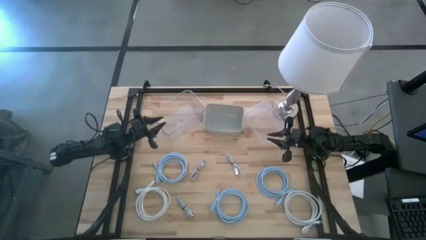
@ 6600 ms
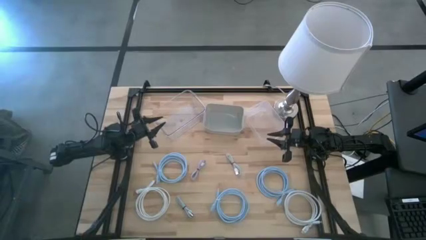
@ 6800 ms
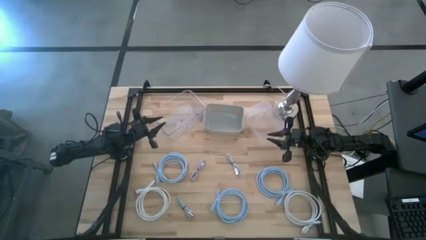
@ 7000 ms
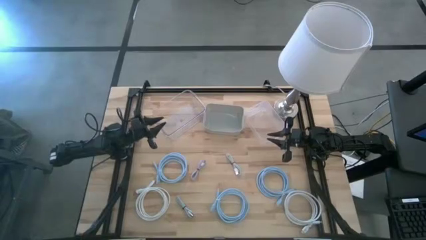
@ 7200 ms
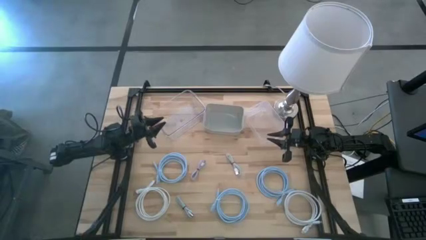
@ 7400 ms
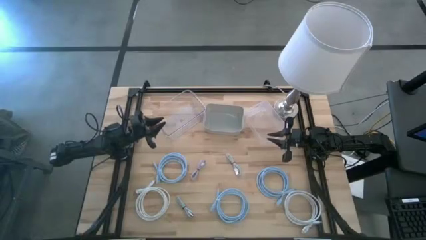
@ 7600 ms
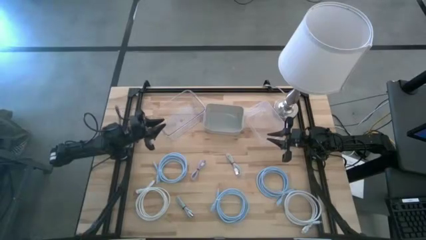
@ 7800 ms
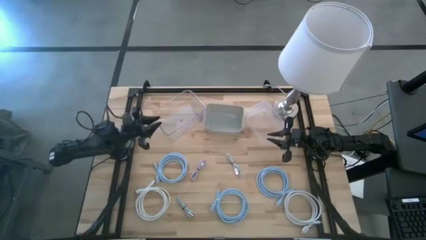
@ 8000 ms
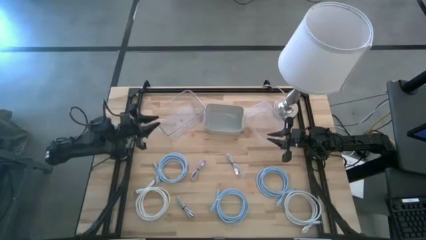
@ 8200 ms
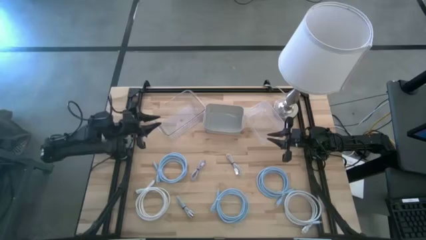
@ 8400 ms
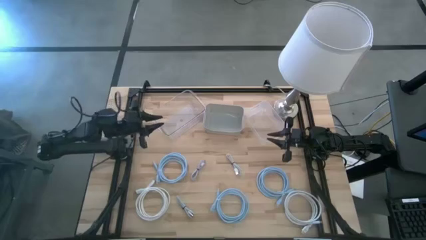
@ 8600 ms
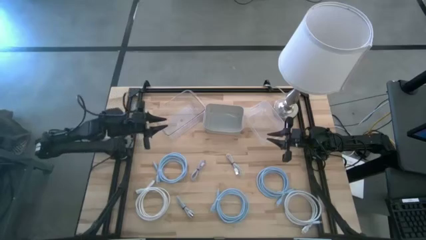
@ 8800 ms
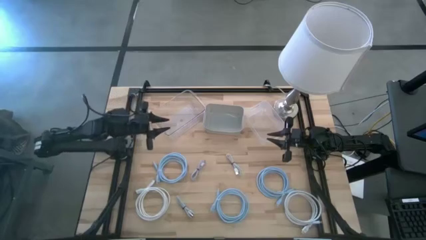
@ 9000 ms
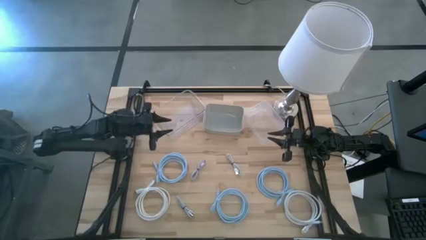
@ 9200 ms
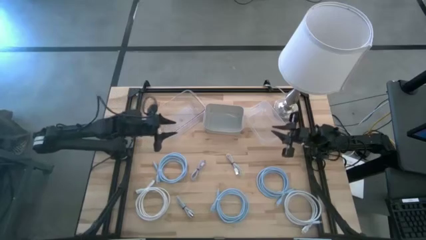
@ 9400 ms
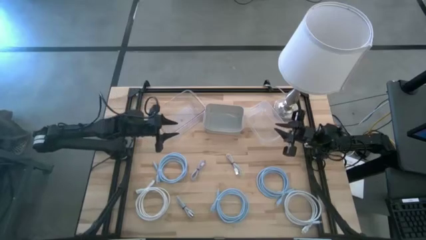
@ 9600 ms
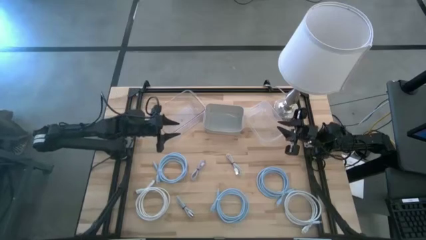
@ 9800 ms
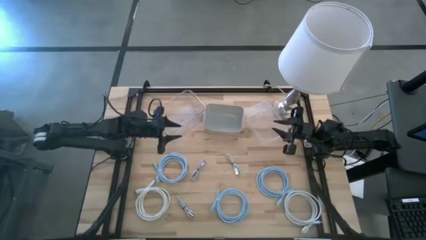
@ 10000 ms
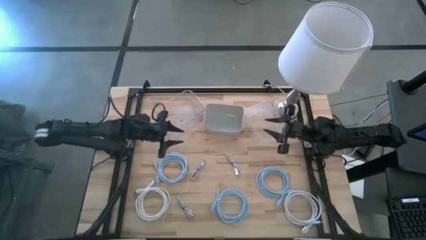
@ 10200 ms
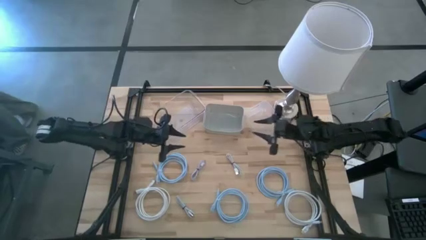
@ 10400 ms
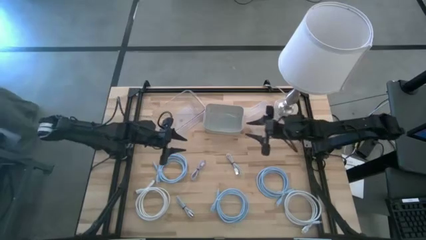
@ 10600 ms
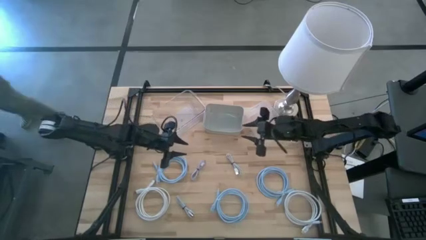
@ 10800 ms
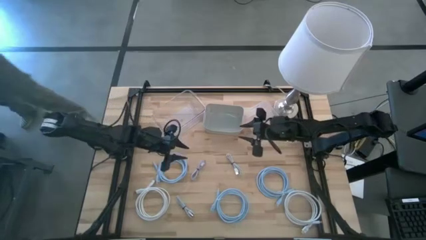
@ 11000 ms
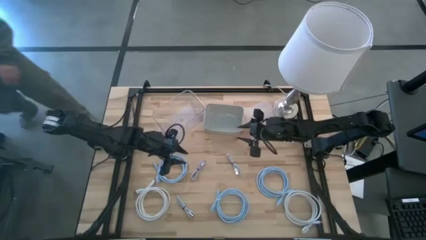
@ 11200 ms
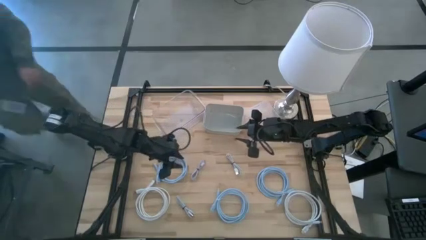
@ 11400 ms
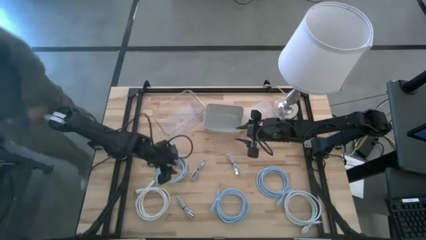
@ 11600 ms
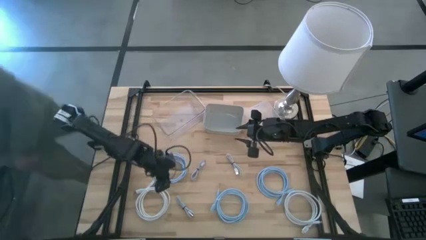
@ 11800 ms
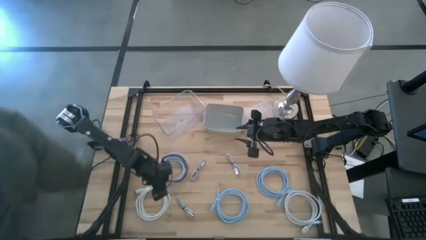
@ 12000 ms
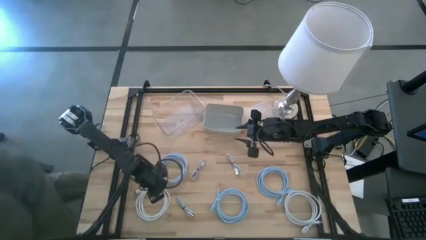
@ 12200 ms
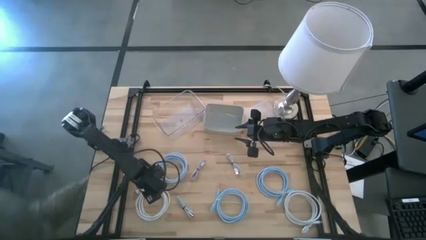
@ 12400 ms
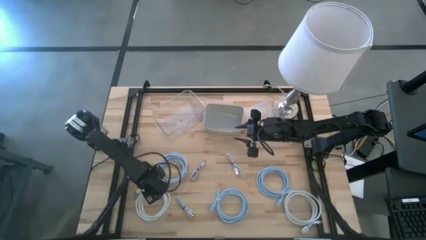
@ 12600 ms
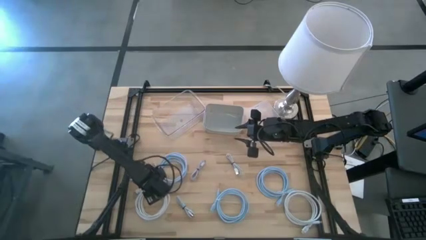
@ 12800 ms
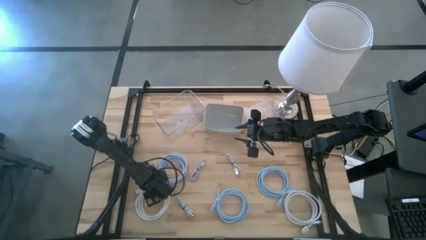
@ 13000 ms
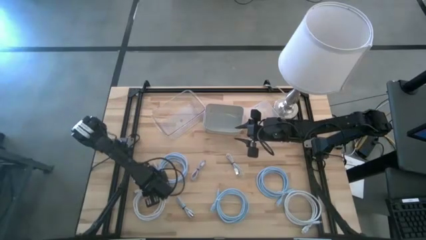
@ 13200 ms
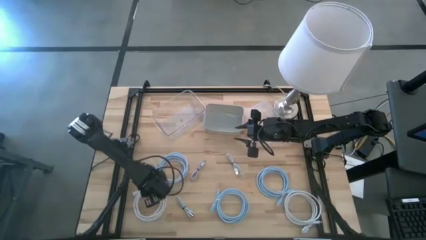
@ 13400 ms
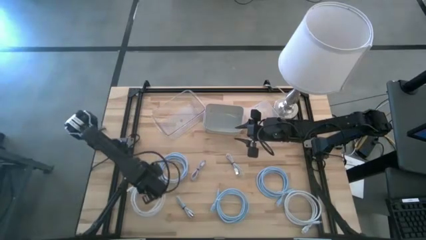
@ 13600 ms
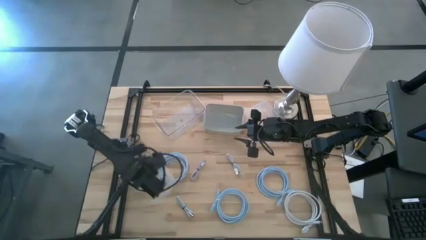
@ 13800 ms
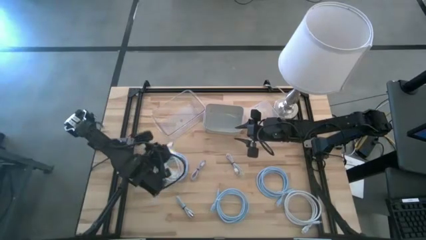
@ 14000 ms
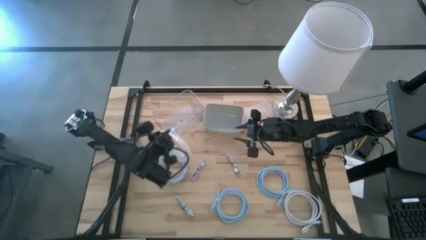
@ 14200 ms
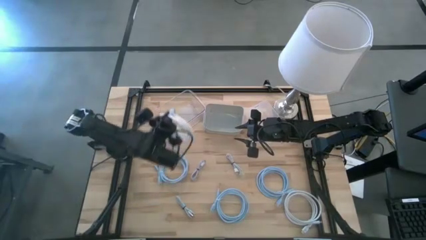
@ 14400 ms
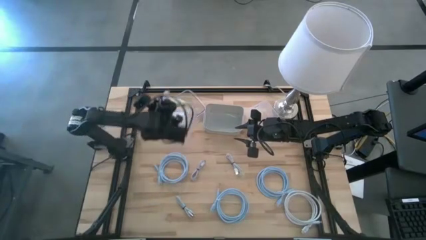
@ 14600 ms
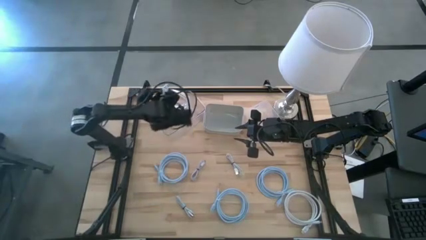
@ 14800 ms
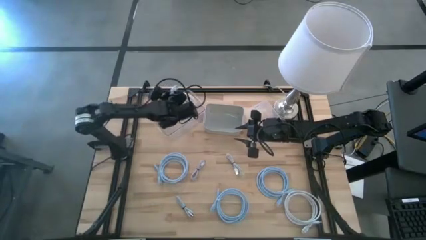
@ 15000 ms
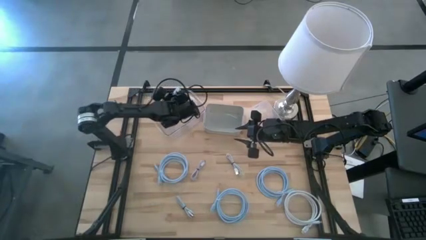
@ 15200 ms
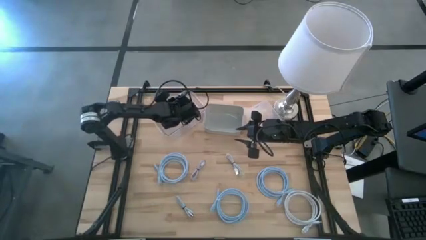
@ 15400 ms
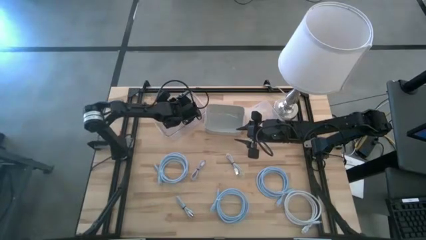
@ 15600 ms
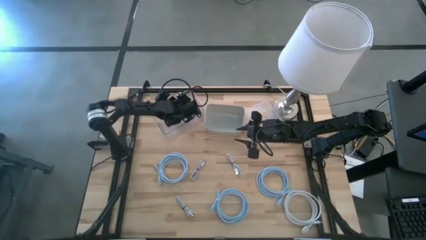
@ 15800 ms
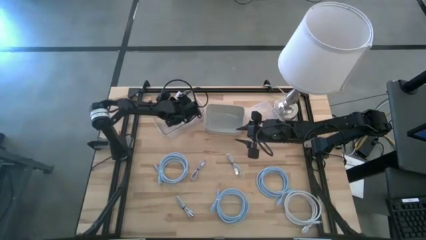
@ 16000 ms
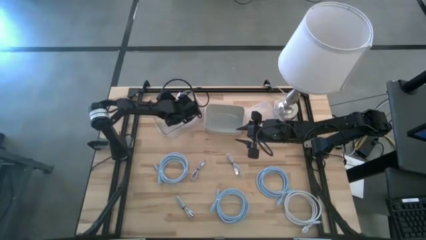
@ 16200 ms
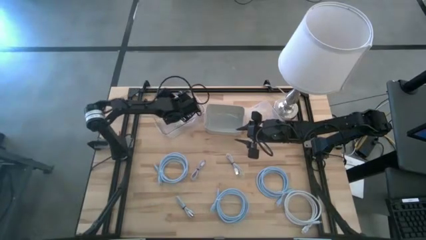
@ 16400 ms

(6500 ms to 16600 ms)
Task: Pick & Place USB Port
Put the left white HDMI cable into the left transparent bin

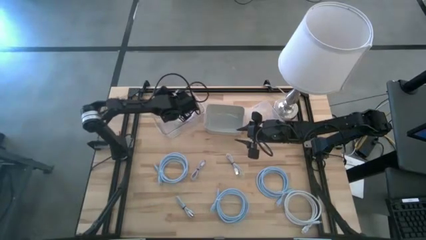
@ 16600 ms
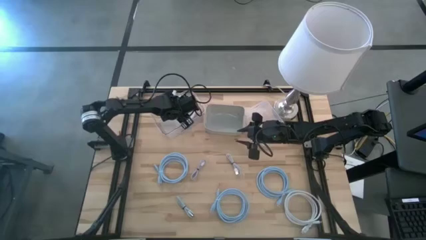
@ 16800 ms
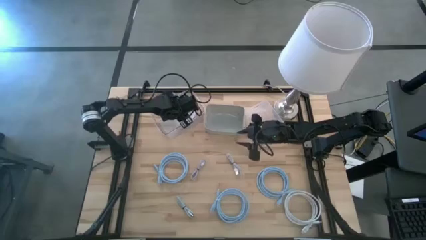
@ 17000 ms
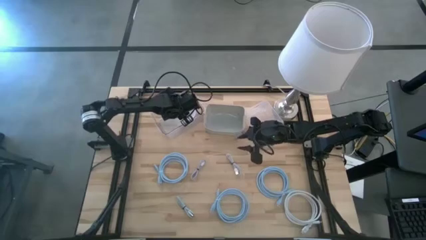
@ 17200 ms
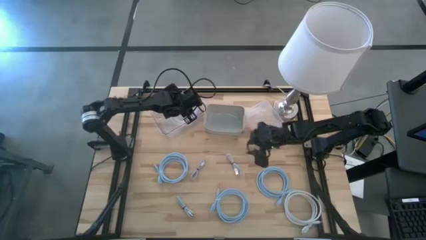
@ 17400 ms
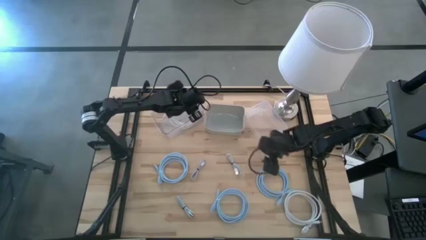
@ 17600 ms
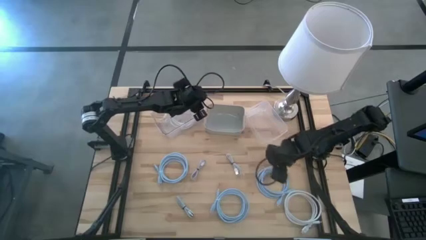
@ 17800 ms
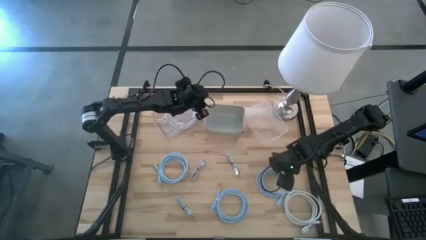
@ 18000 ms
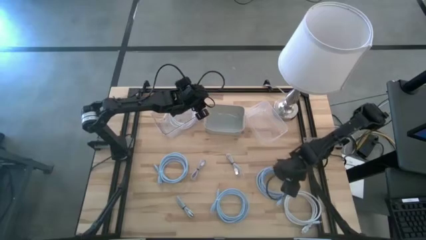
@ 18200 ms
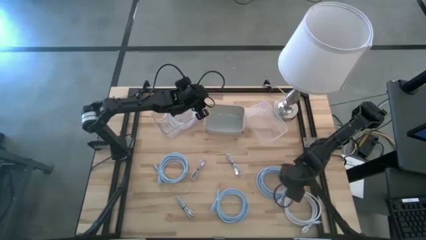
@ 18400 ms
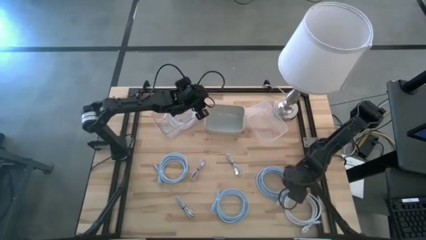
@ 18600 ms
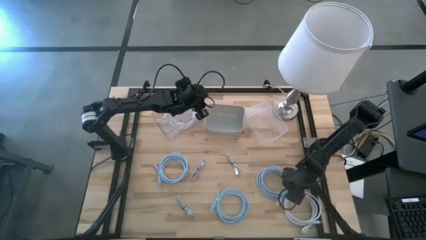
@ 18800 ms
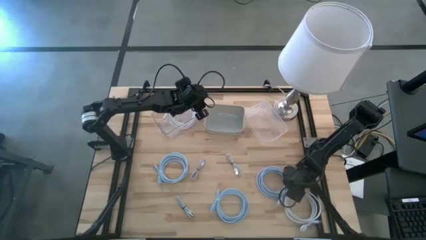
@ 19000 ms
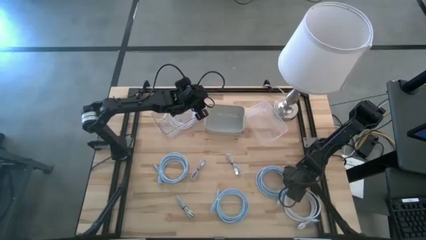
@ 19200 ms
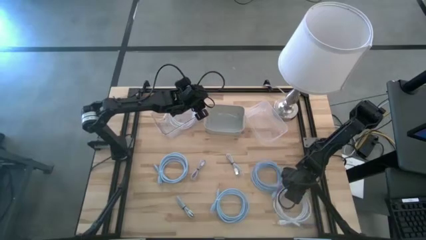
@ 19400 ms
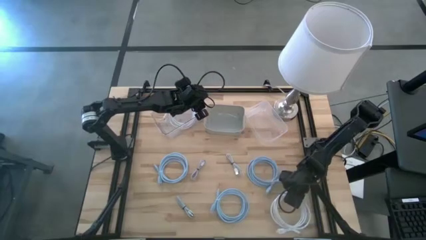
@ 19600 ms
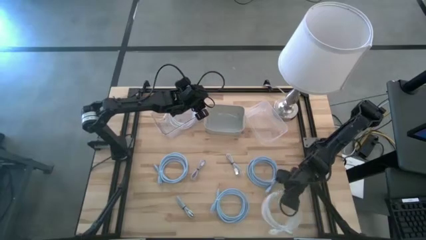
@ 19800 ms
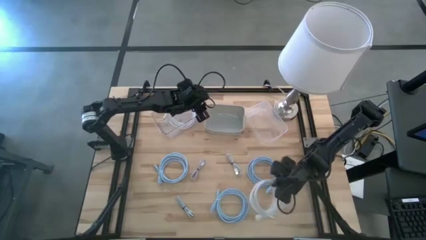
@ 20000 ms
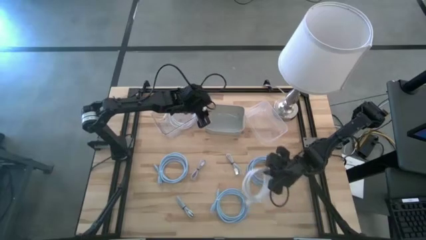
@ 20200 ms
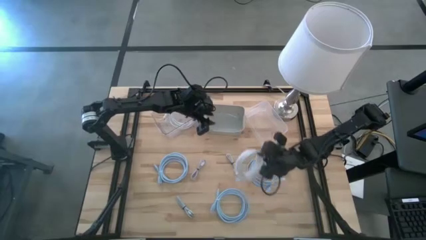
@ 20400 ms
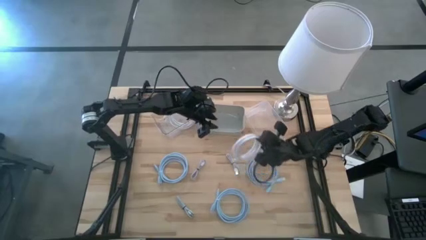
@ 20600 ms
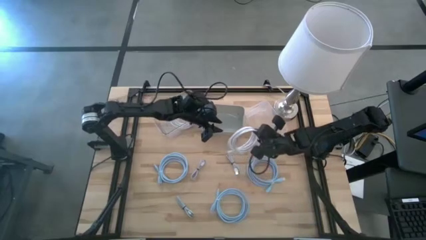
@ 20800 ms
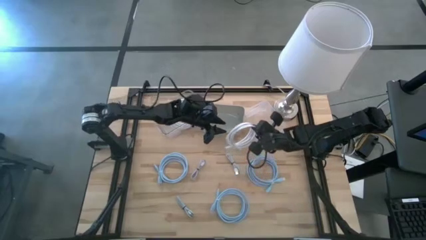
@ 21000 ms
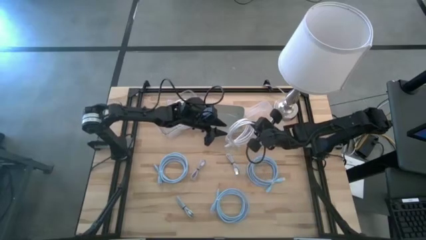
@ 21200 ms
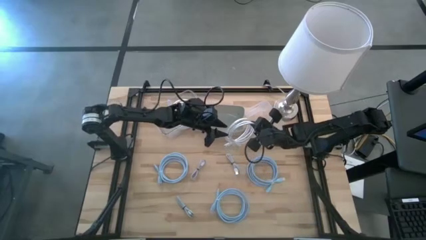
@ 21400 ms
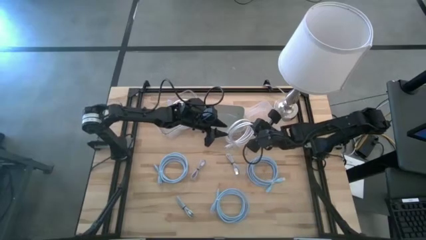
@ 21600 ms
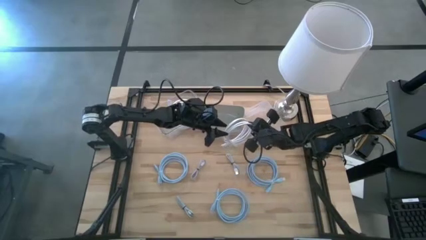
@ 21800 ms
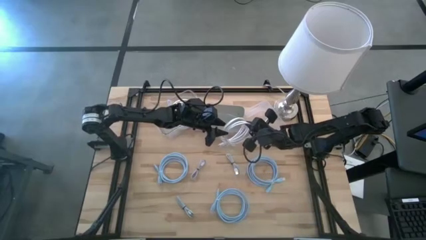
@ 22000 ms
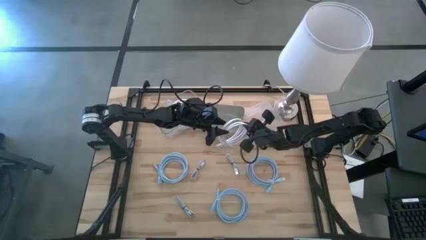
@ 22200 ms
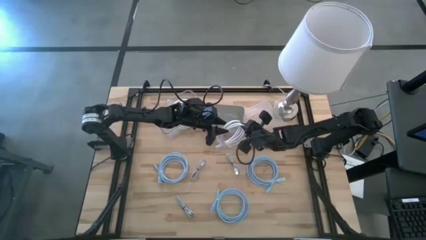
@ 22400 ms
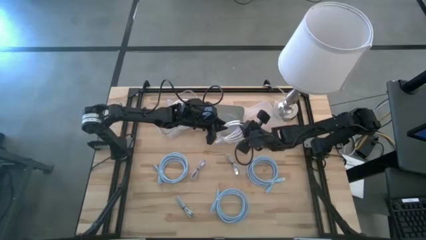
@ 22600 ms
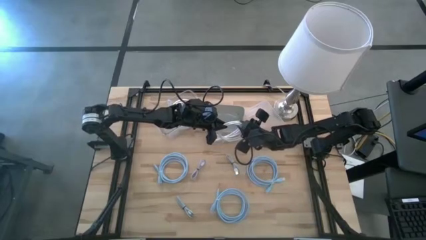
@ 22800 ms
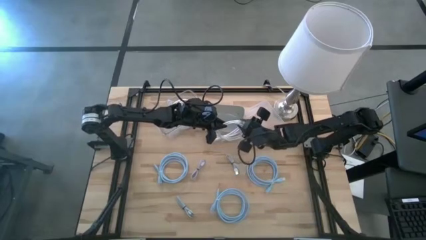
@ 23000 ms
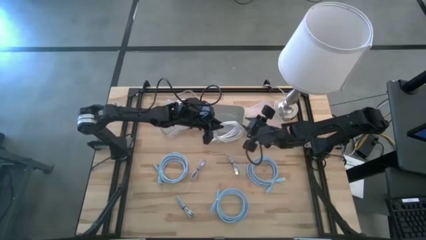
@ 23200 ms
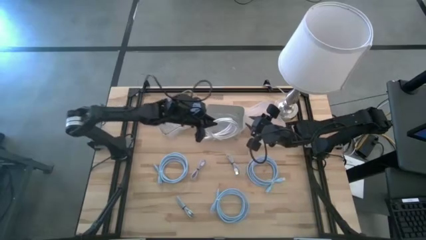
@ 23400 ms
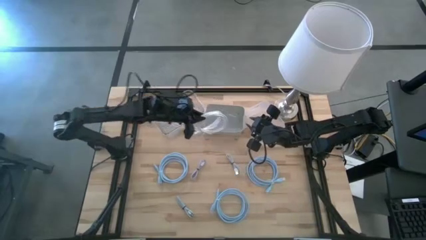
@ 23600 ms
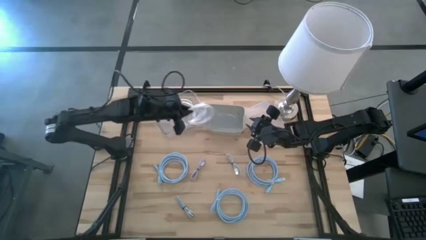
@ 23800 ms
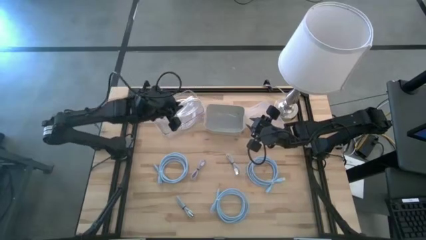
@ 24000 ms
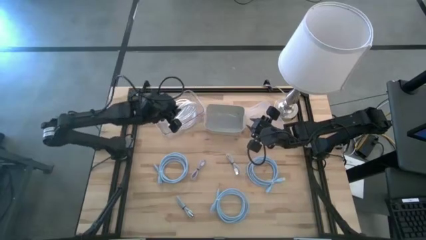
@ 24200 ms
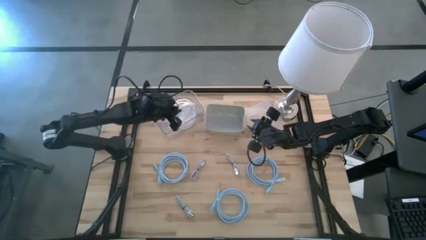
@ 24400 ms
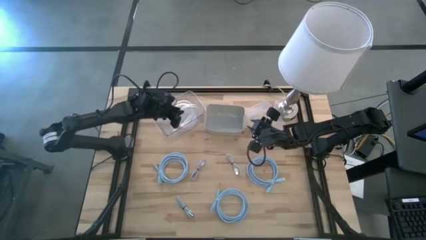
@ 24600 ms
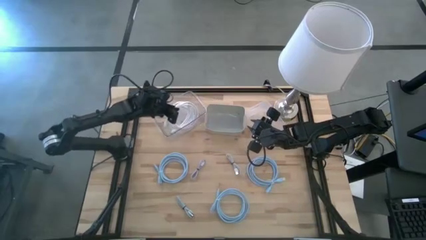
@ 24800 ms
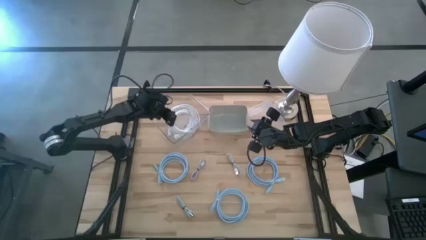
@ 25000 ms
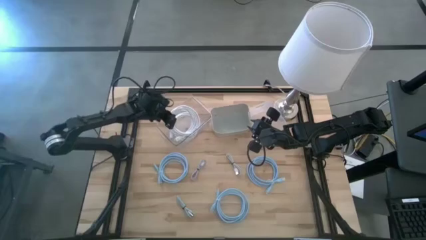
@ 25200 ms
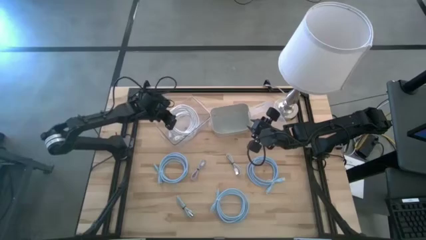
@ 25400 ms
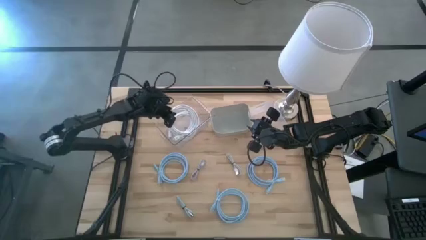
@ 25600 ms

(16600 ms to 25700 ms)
Put the white HDMI cable into the left transparent bin
